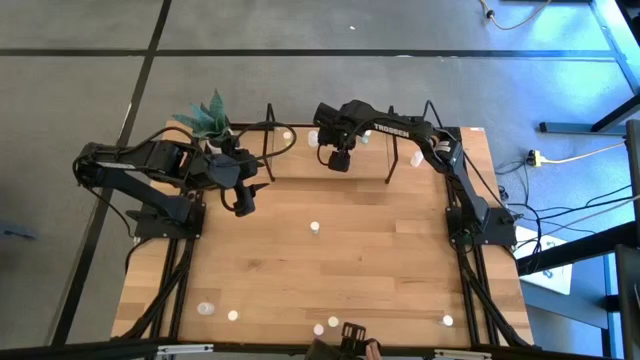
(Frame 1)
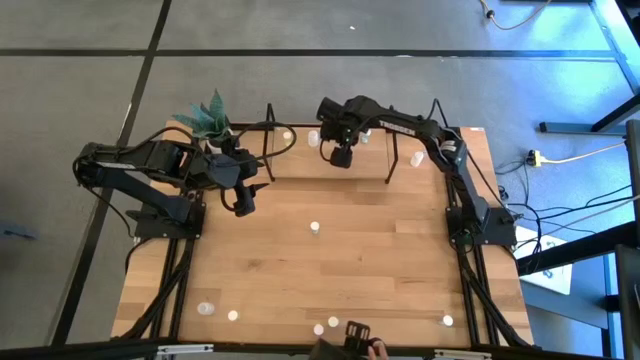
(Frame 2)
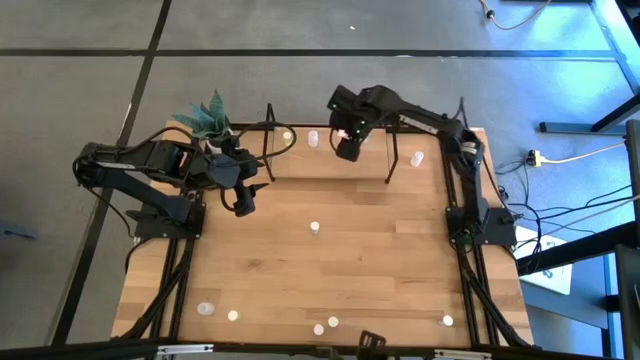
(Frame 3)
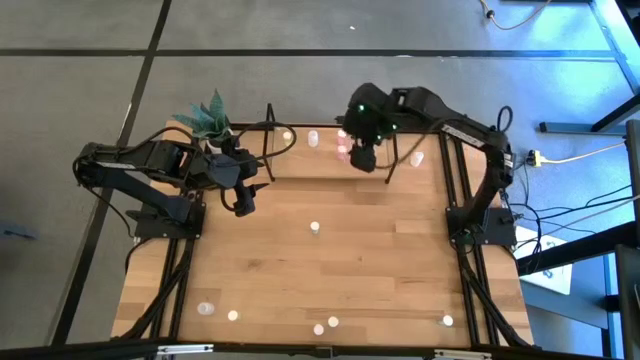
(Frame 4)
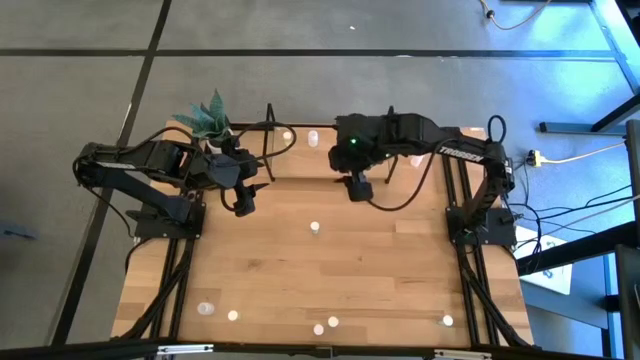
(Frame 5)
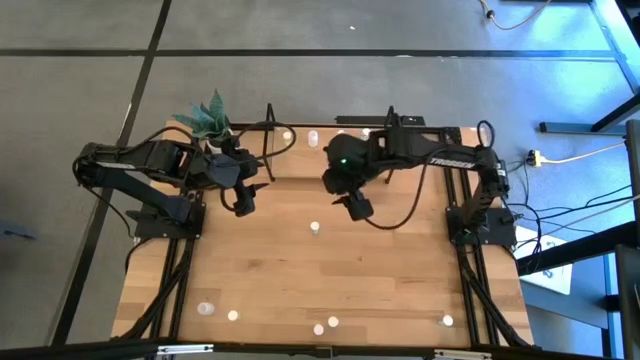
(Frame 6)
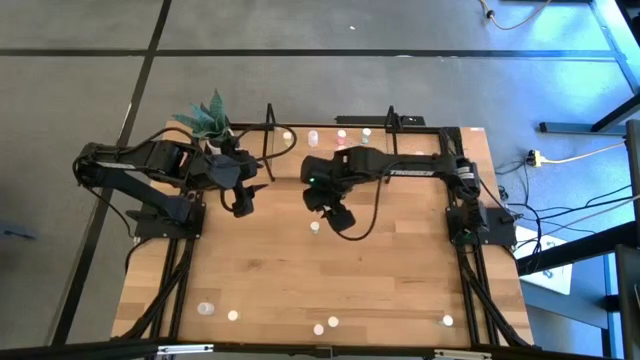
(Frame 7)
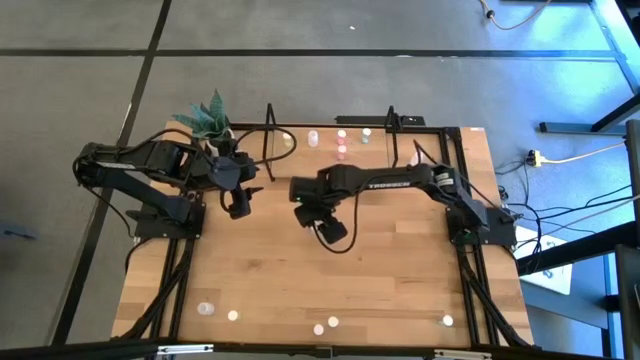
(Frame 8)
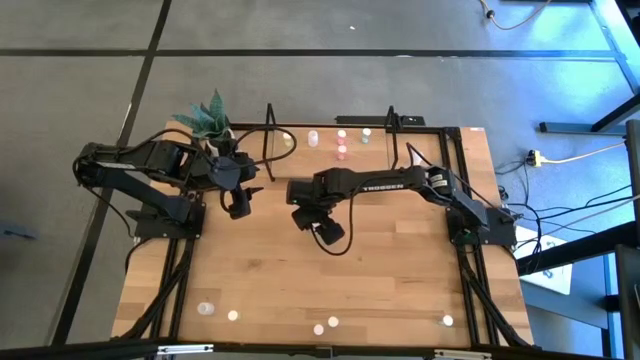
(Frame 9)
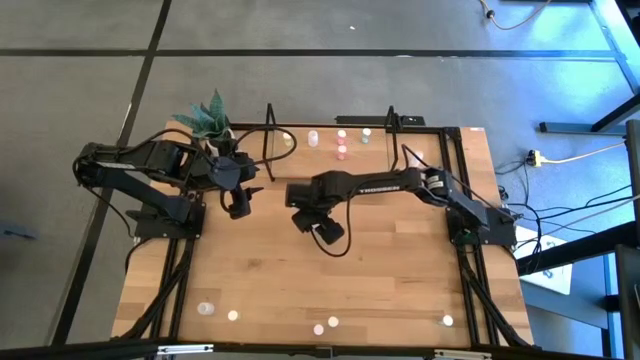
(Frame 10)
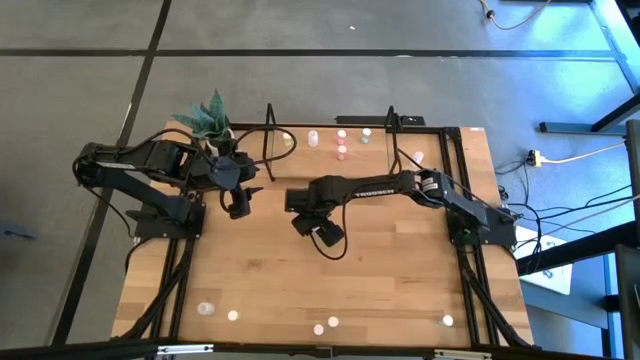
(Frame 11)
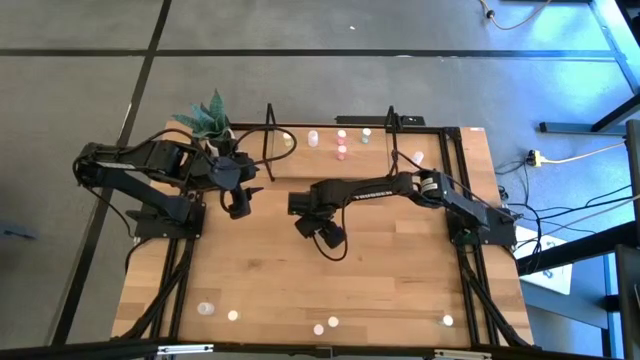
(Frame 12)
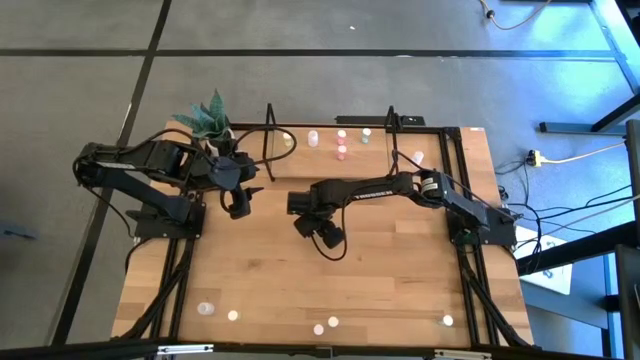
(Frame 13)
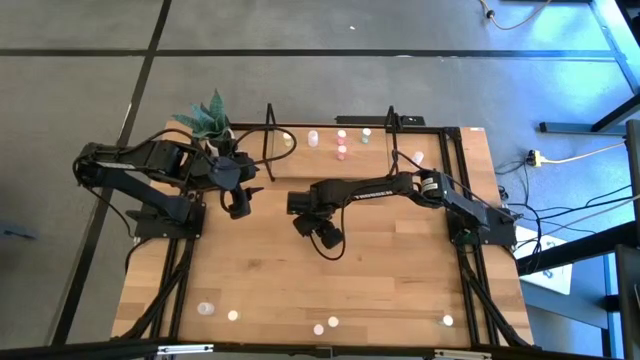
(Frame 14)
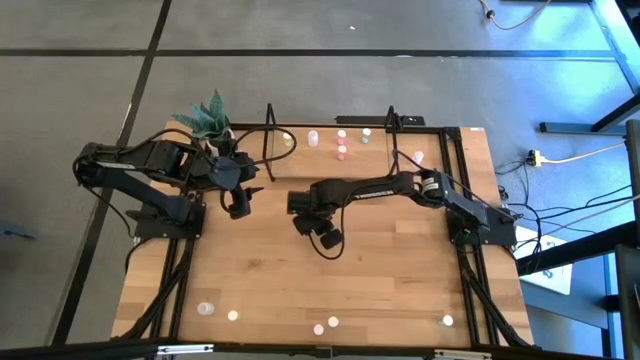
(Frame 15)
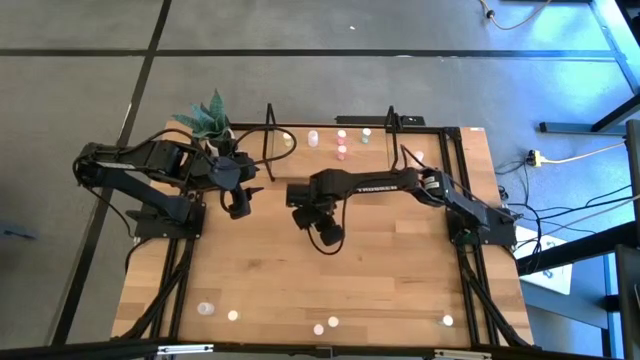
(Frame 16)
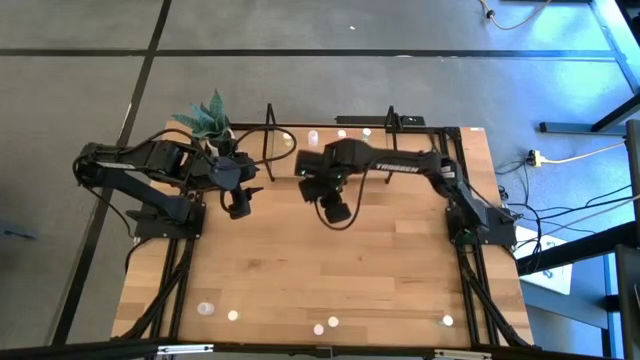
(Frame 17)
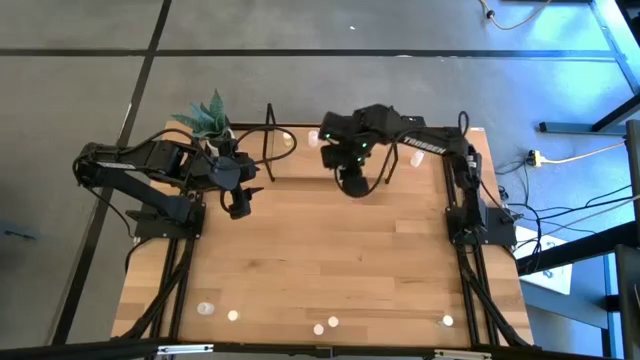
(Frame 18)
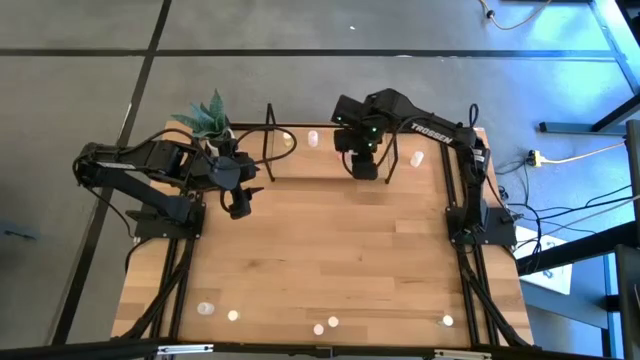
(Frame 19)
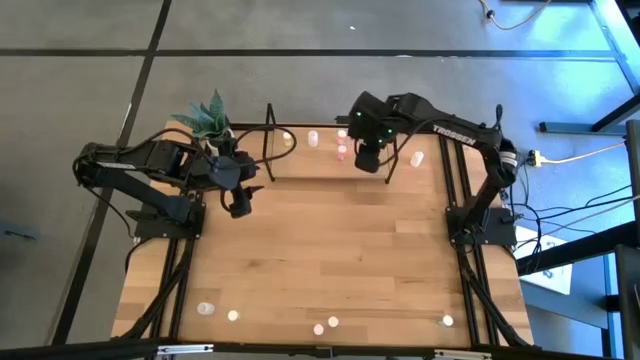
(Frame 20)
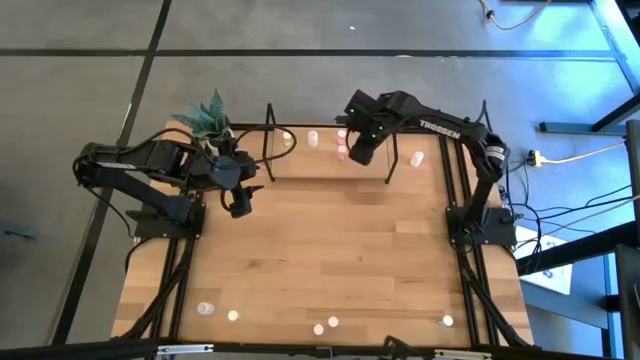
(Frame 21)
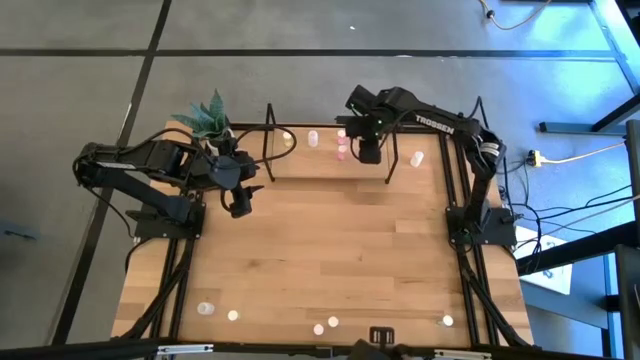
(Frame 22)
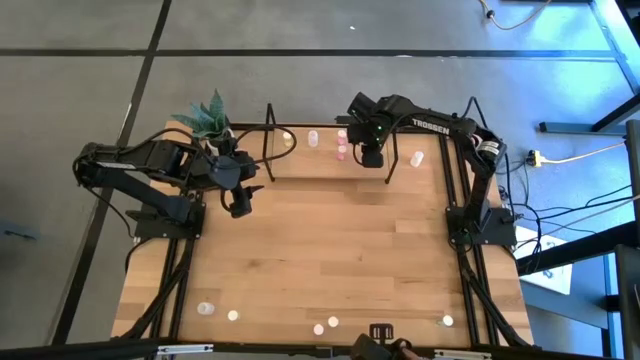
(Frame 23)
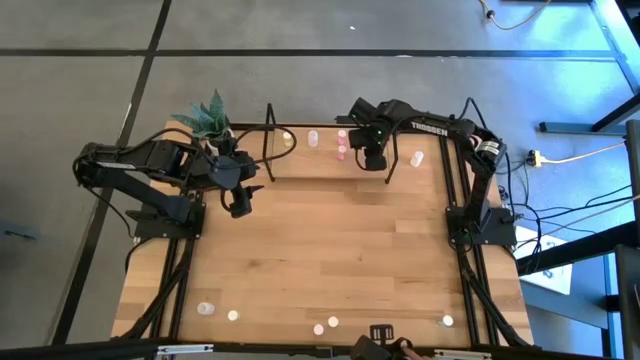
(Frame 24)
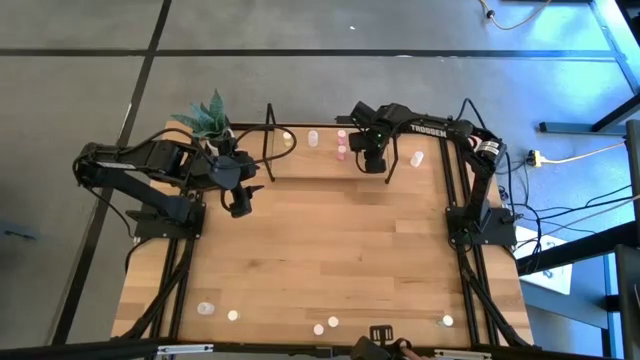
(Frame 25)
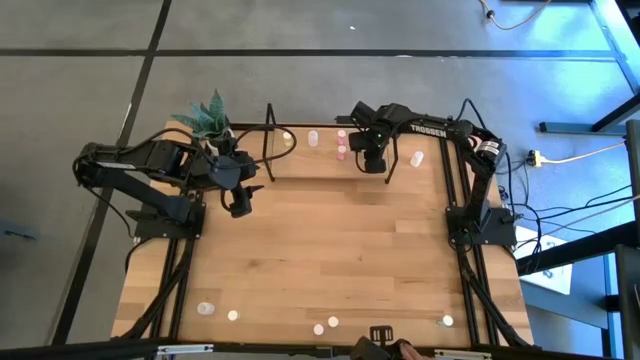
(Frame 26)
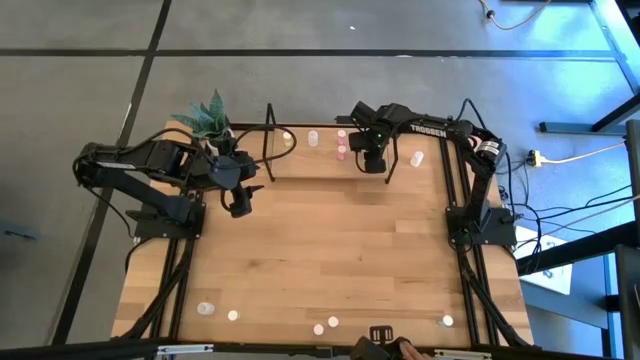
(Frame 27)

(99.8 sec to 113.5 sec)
Task: Pick and place medicine bottles onto shelf by color
Put the top blue pill bottle on the shelf aligned with other blue pill bottle

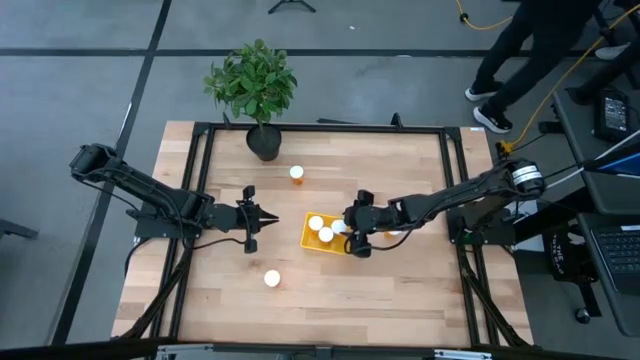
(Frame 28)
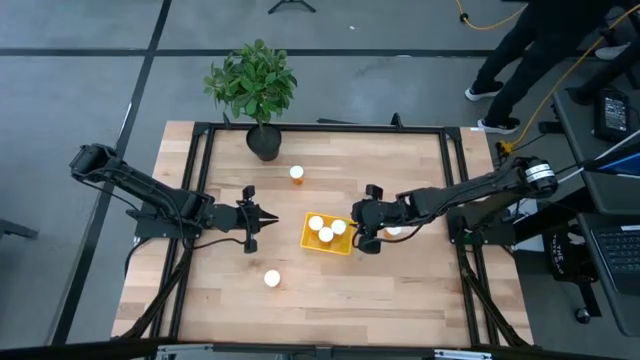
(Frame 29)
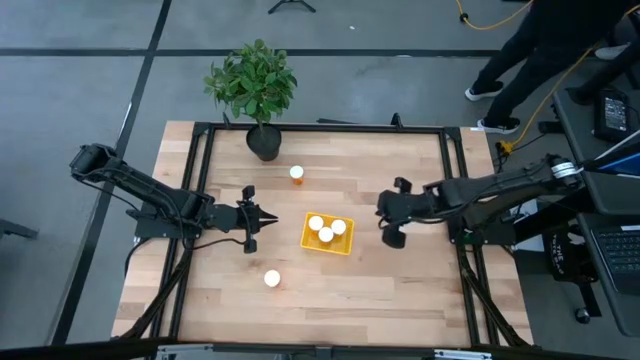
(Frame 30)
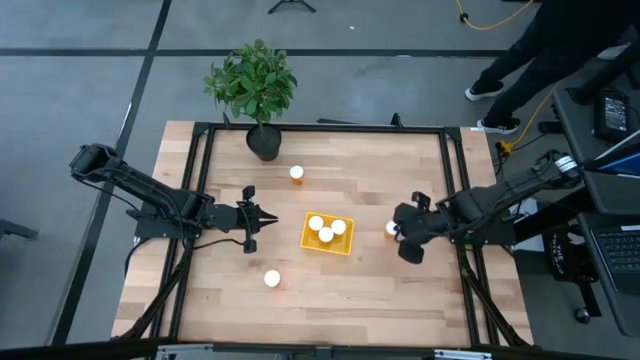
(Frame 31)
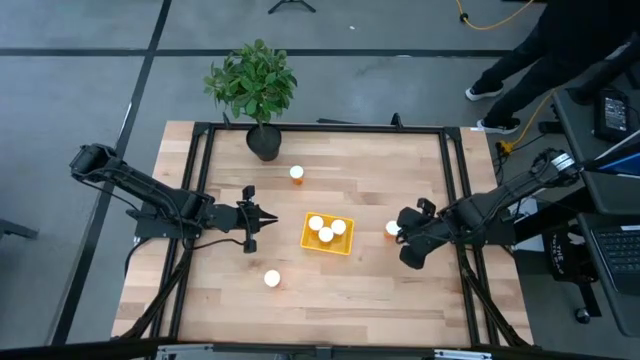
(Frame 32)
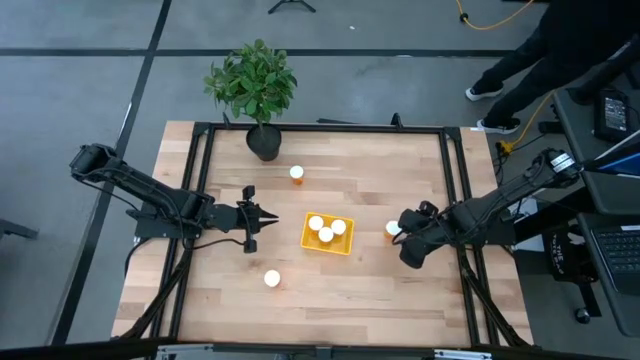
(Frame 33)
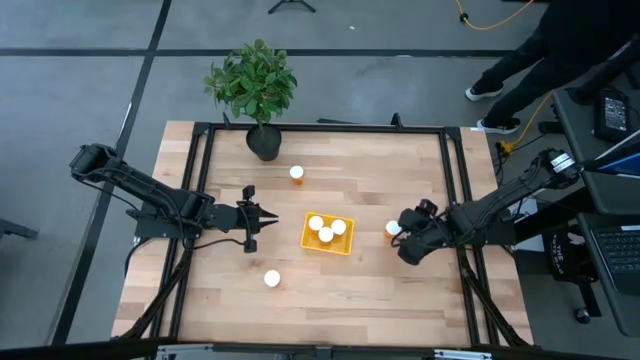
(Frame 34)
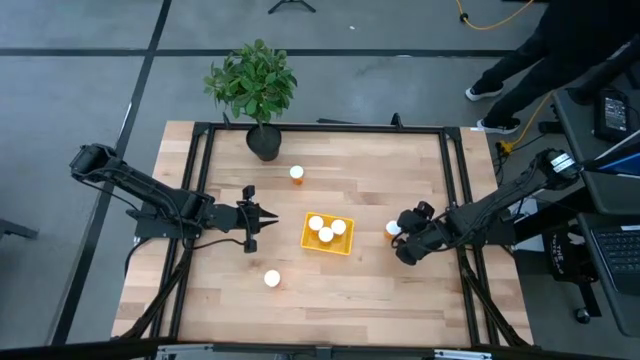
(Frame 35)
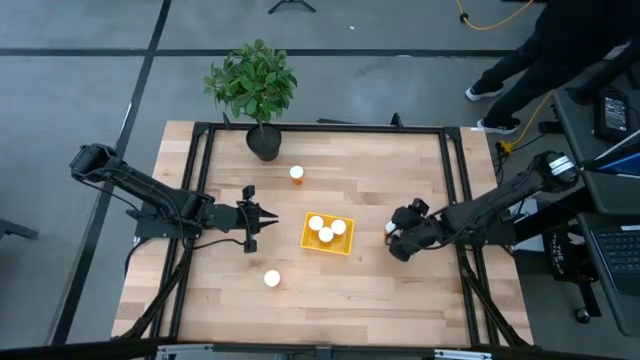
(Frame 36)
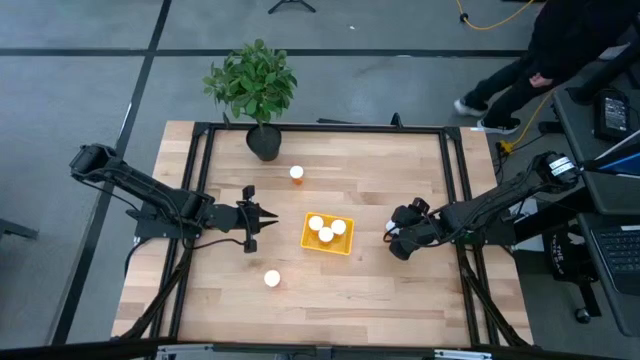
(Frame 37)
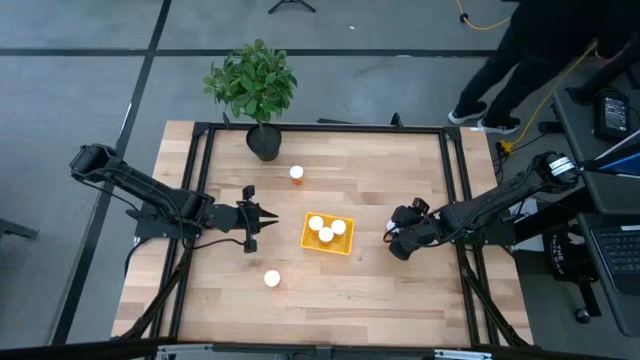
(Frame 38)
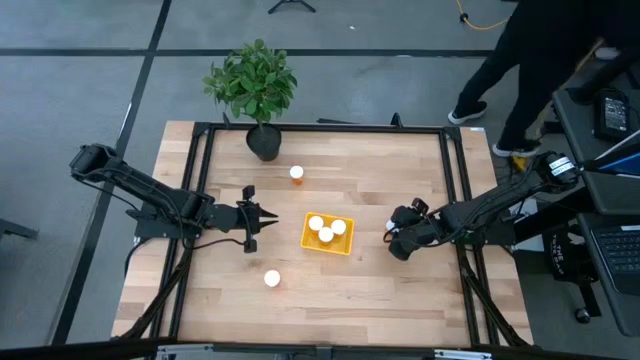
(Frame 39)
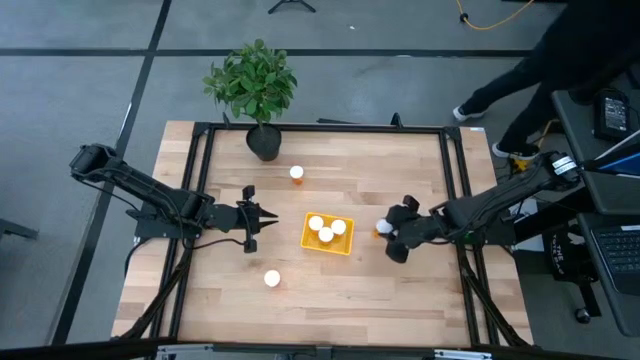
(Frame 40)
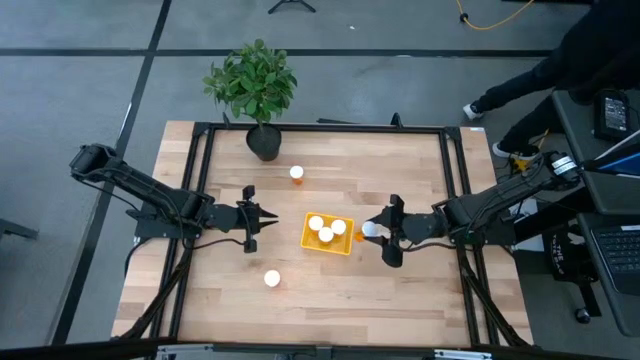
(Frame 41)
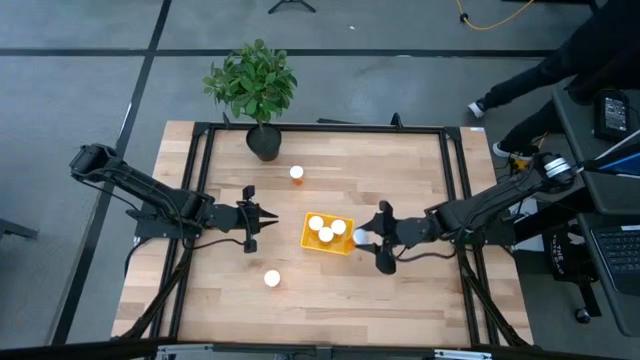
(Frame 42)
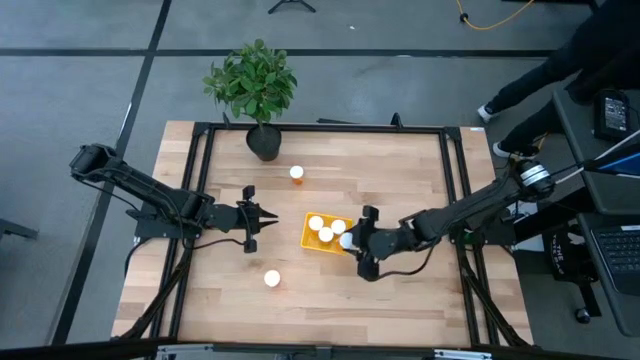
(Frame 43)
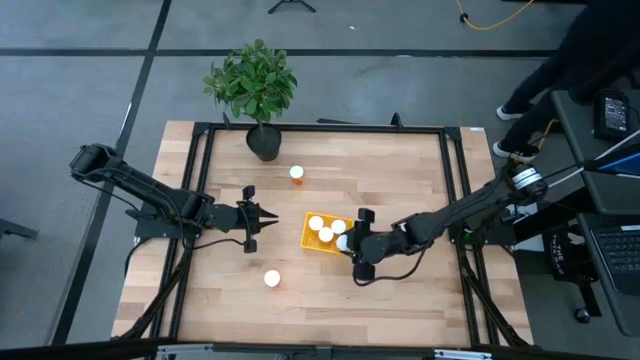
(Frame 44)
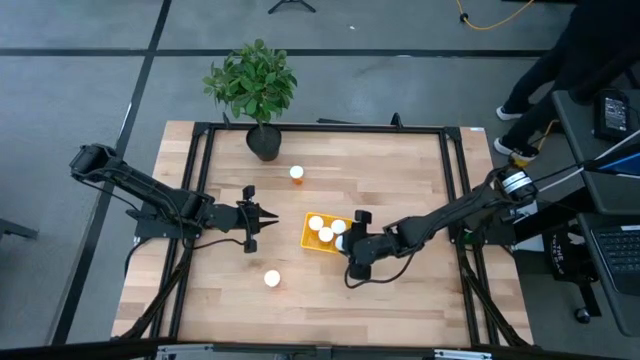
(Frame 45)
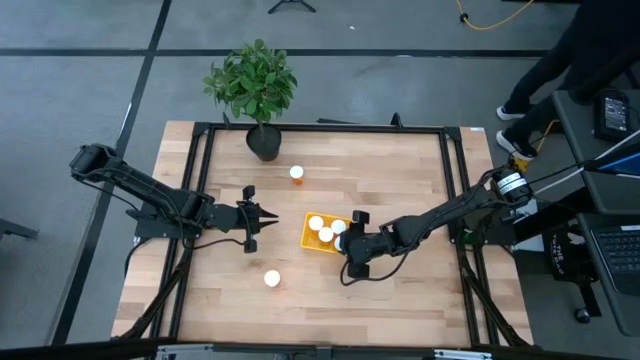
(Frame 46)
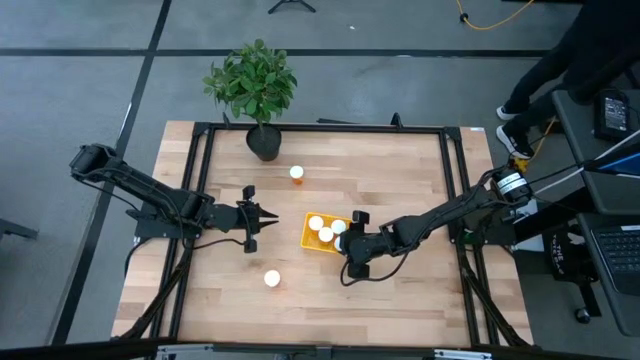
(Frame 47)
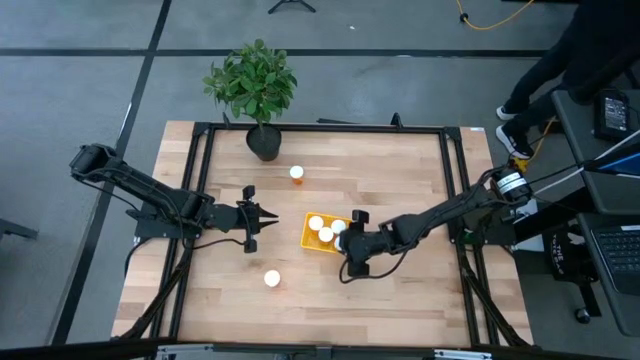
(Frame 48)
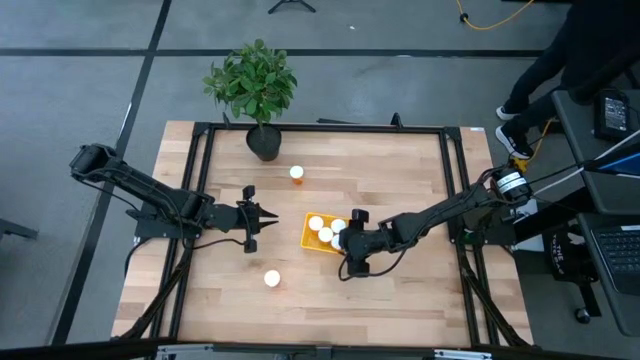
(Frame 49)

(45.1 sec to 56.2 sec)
Task: Pick and place pill bottles into a basket
Put the middle orange pill bottle into the yellow bin
